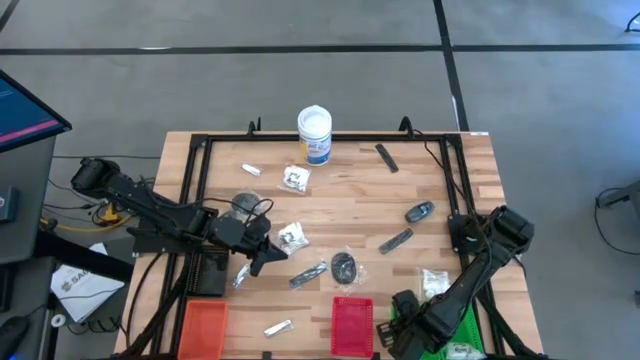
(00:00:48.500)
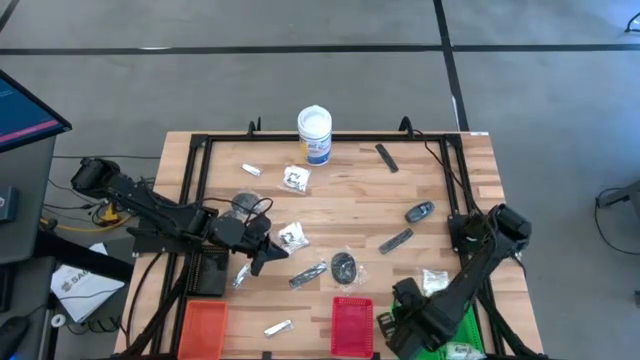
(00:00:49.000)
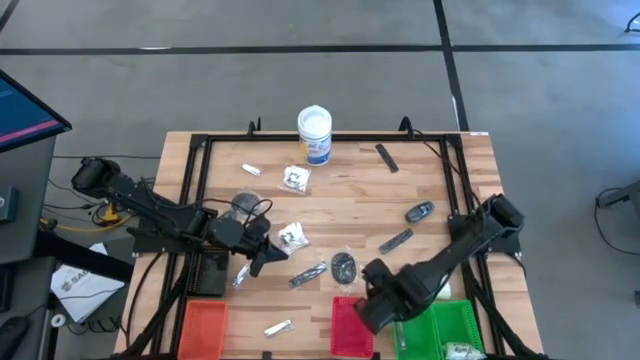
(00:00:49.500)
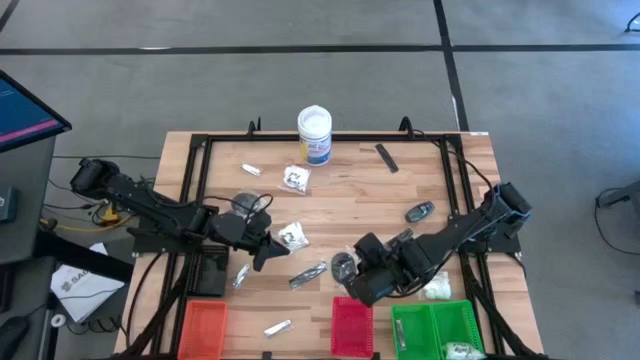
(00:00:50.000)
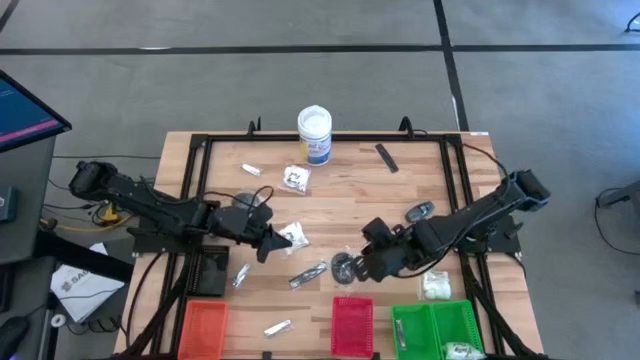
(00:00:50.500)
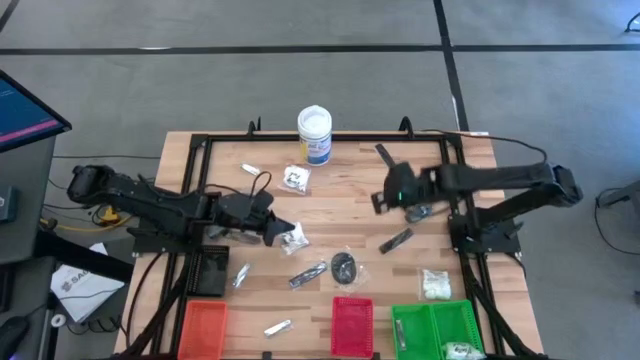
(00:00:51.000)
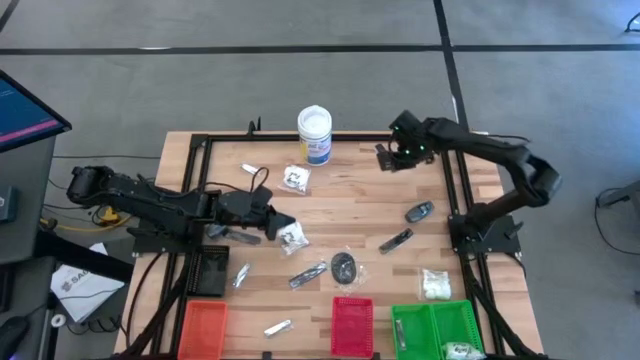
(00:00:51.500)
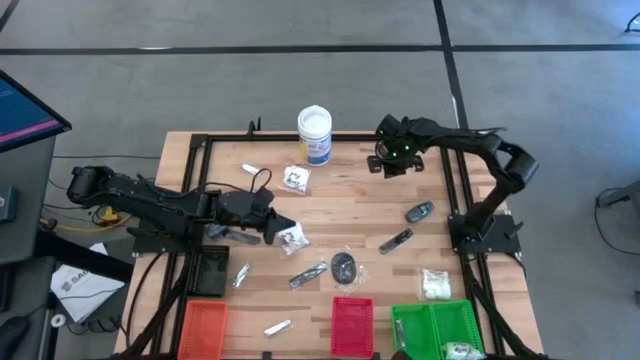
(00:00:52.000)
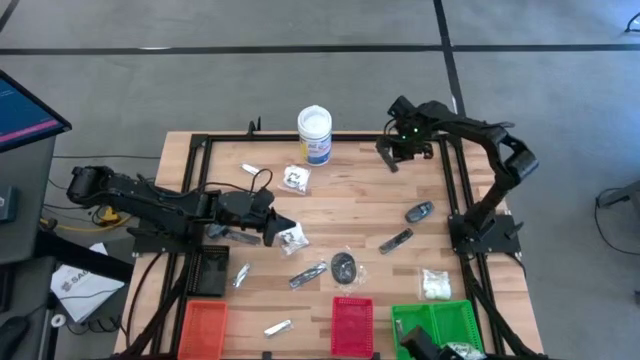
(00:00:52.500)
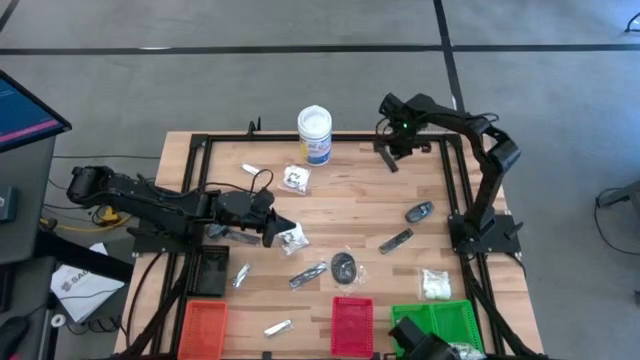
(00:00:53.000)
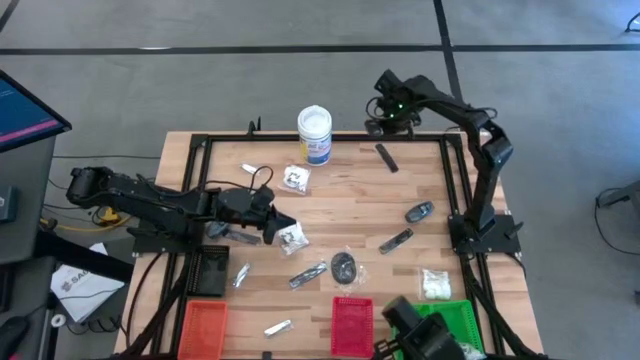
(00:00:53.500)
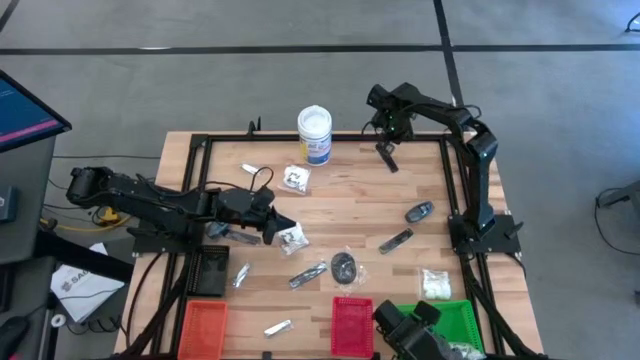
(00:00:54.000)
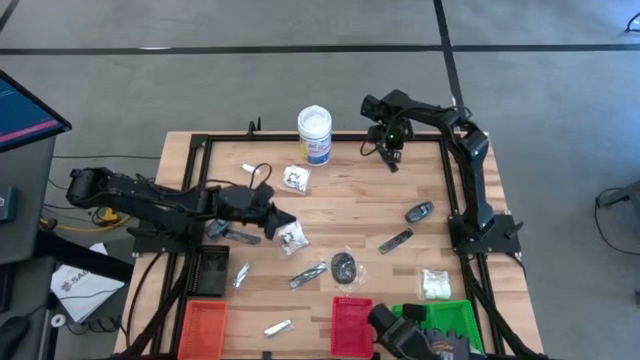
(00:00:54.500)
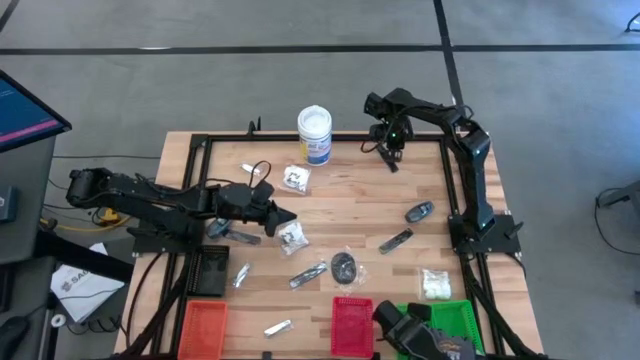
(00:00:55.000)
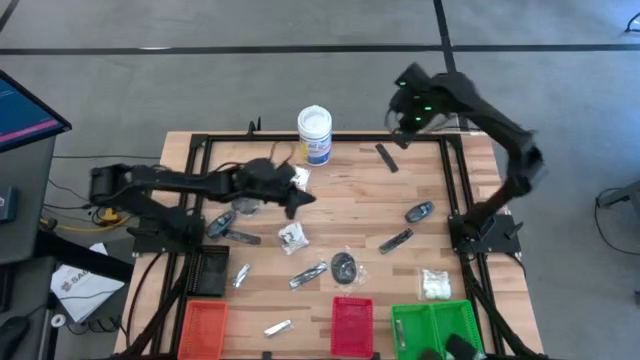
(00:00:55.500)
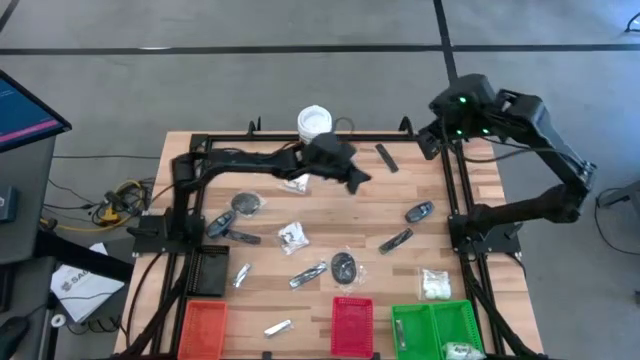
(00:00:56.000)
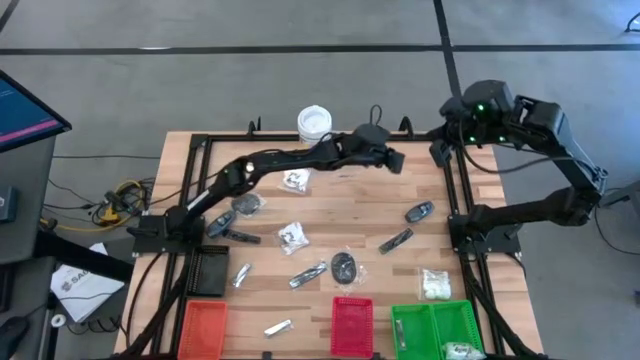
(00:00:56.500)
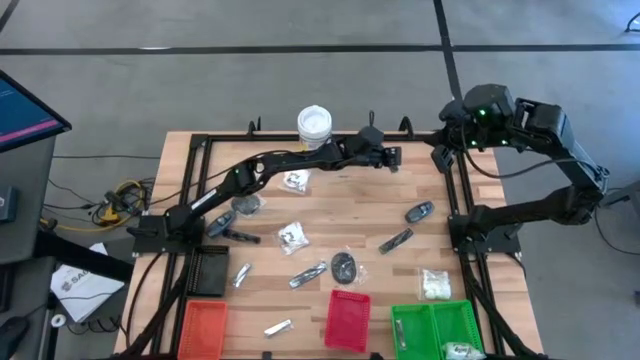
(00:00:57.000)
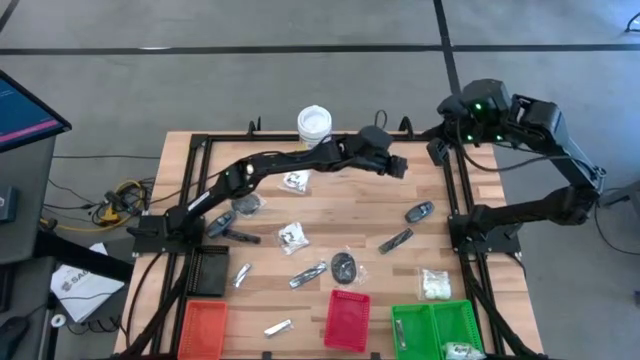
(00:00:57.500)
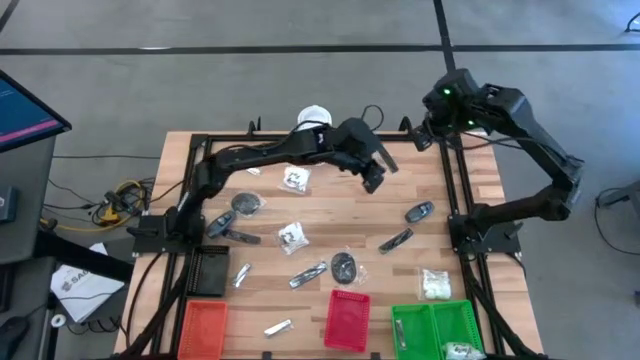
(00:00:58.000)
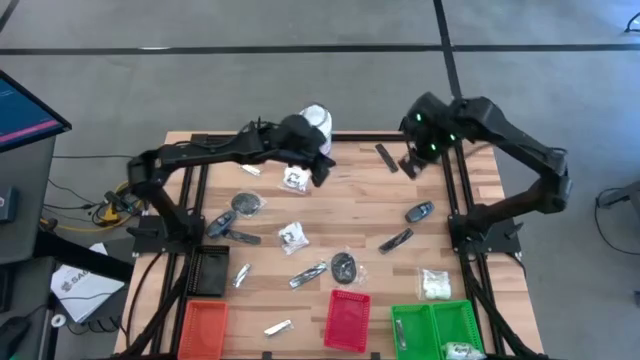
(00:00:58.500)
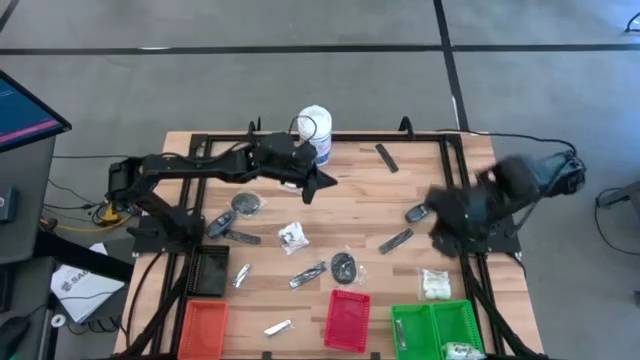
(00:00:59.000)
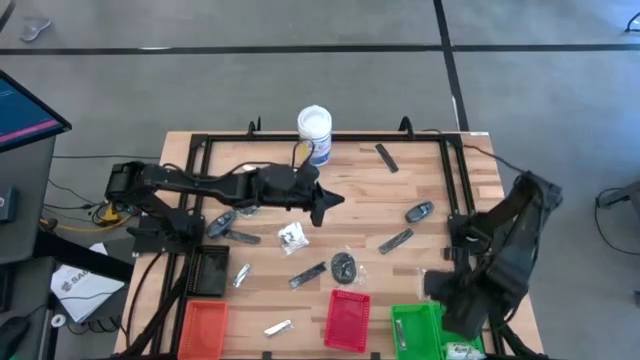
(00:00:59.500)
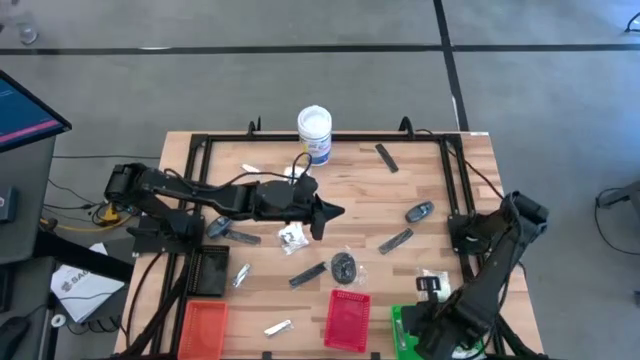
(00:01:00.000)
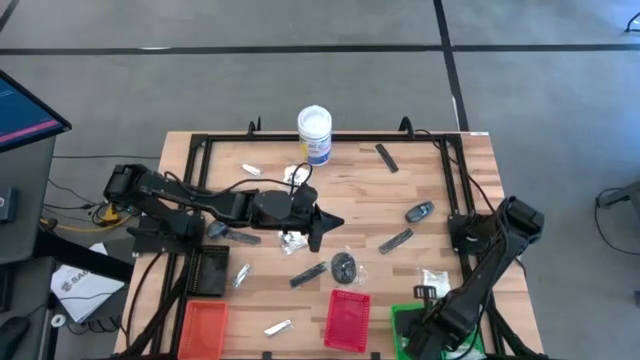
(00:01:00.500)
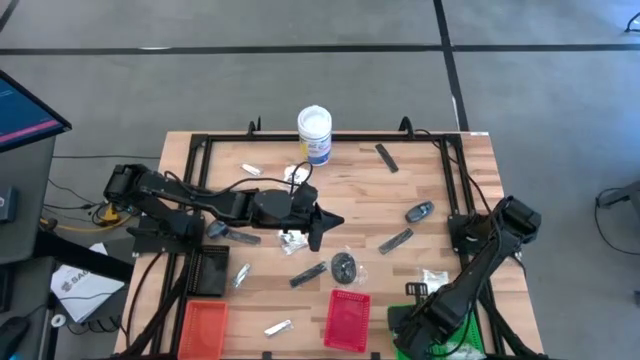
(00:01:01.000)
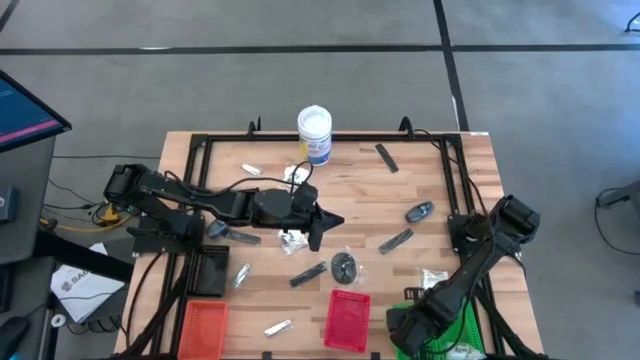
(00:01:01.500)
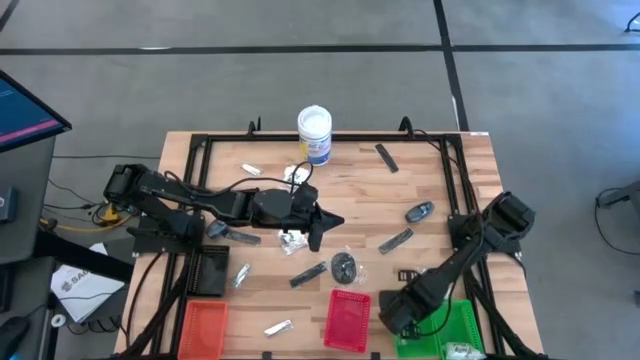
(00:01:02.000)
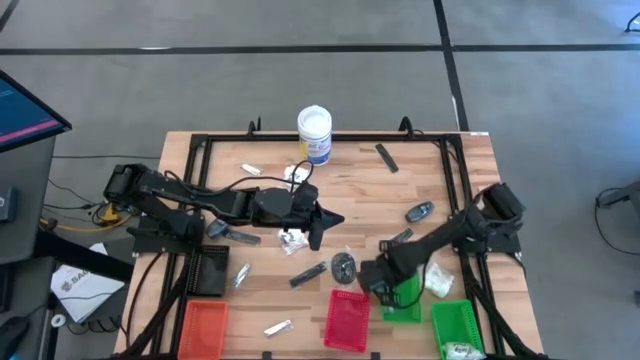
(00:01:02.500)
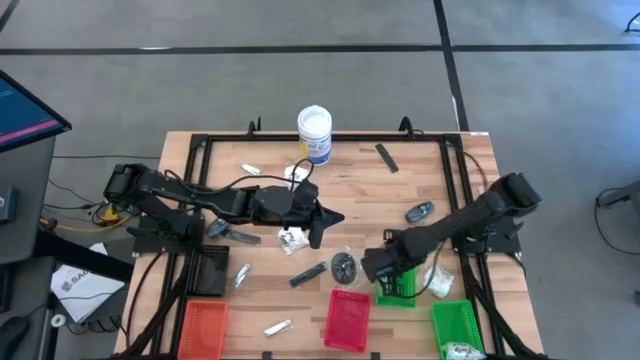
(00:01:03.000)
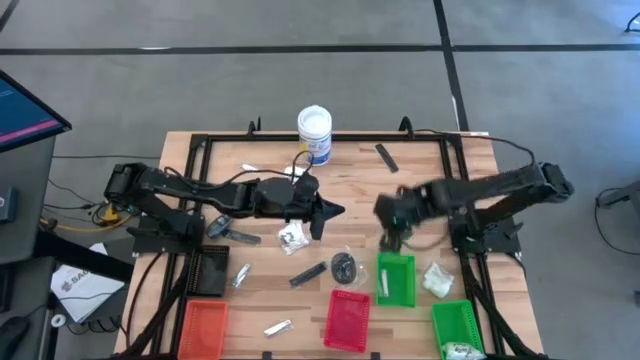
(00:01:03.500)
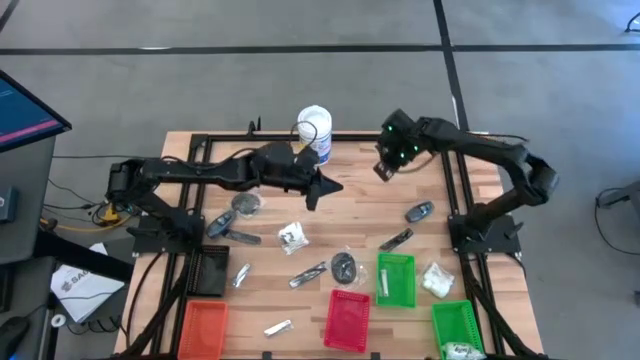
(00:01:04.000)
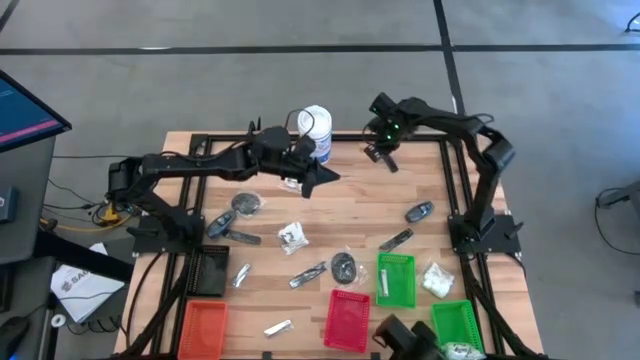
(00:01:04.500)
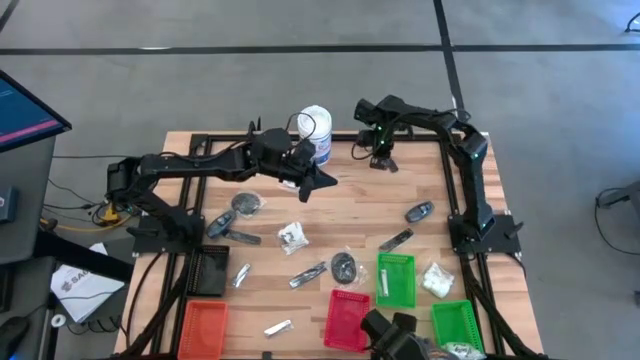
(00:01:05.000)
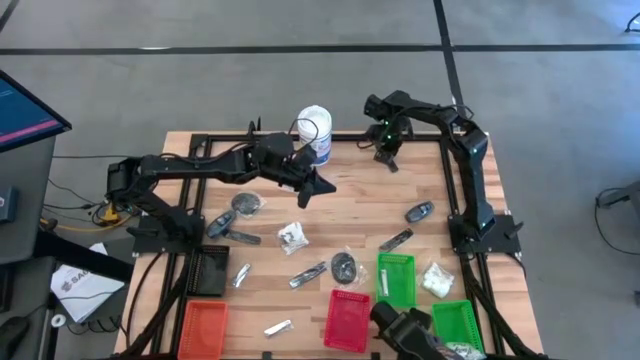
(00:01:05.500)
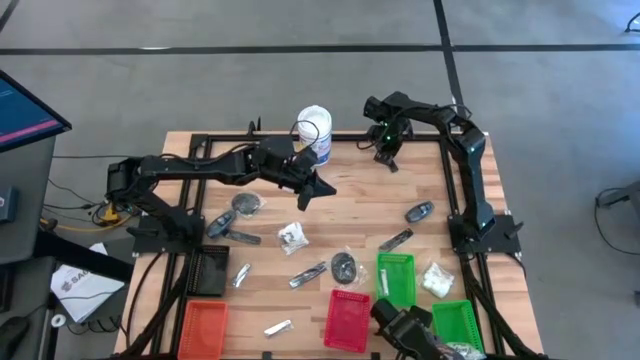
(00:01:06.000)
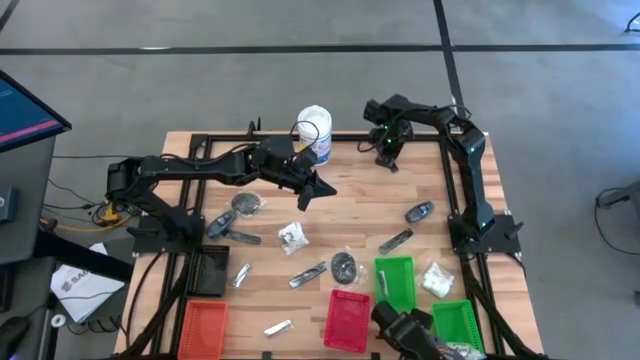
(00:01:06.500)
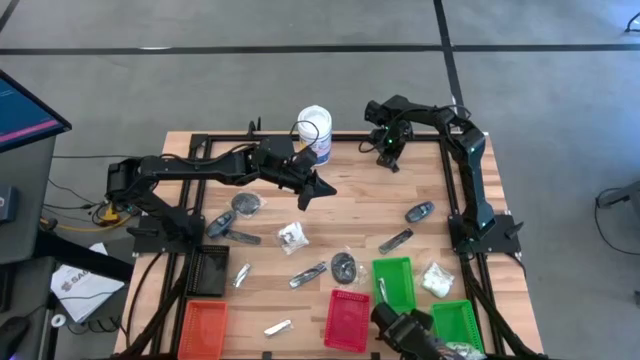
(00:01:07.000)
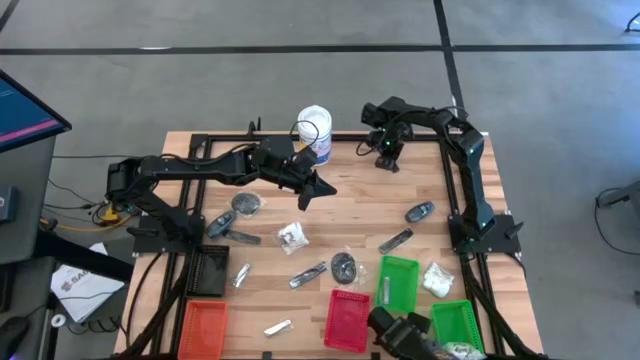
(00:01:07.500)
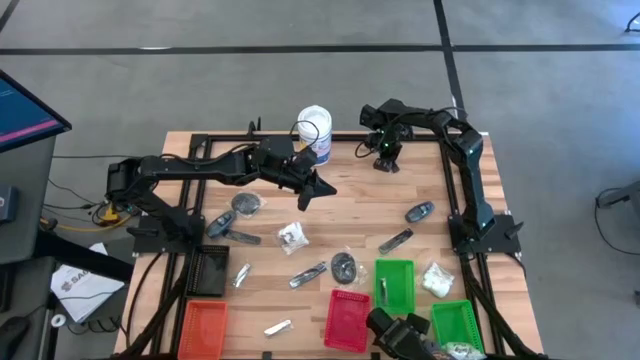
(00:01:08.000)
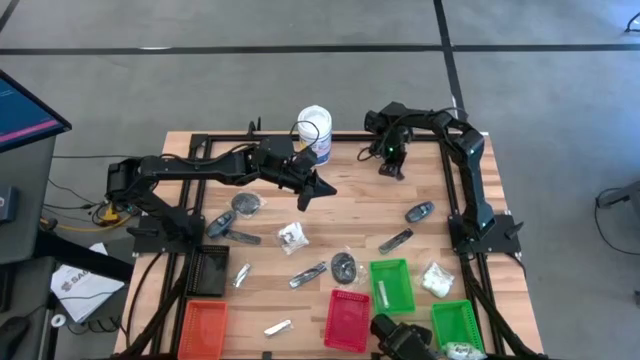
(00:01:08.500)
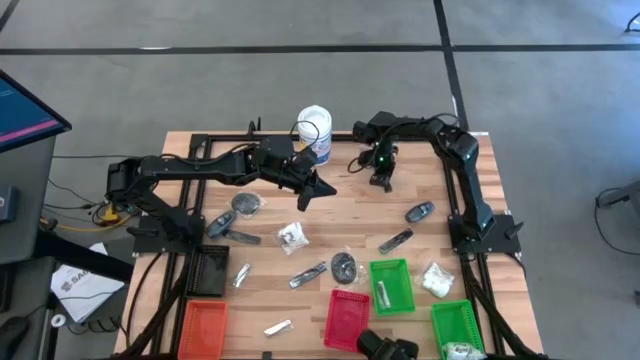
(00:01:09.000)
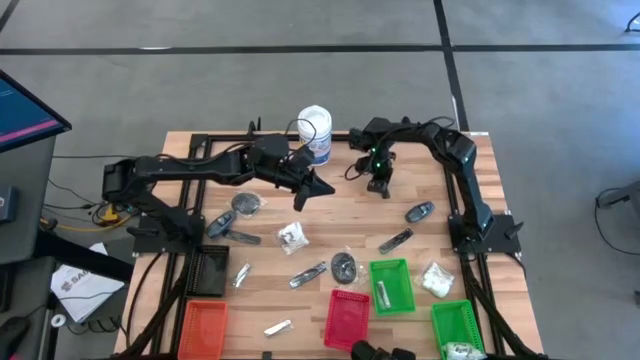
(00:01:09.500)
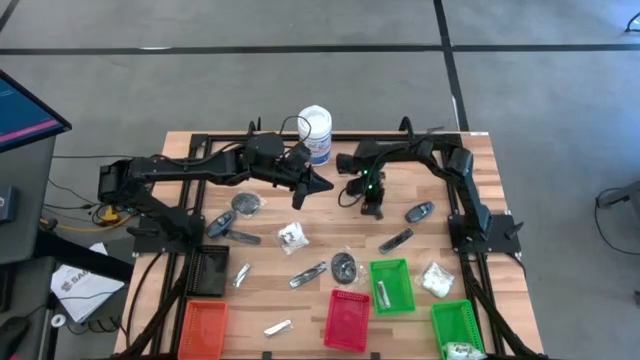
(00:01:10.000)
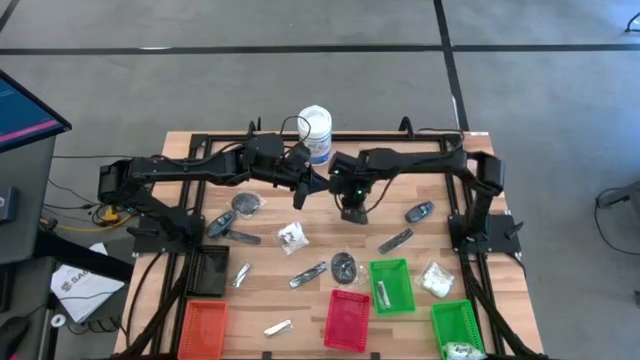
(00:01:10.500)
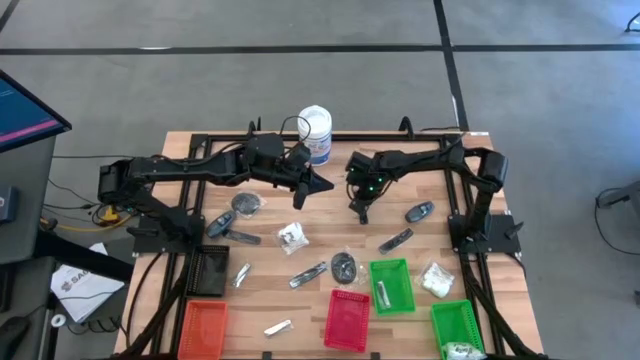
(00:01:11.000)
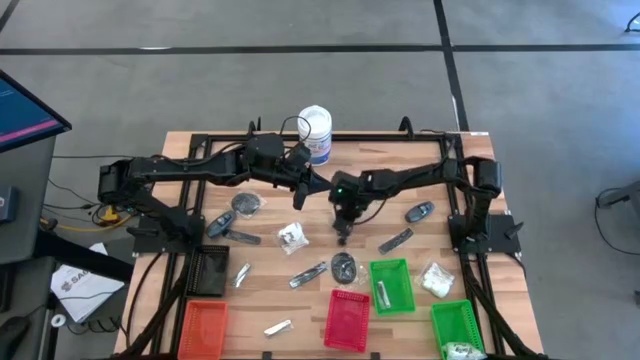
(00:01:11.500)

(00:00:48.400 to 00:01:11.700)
Task: Pick & Place Travel size toiletries
Move the black comb to the center of the table
